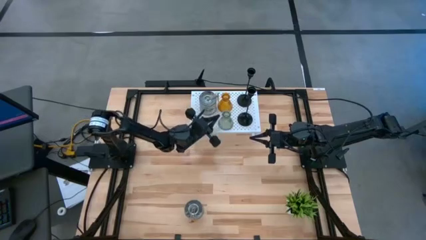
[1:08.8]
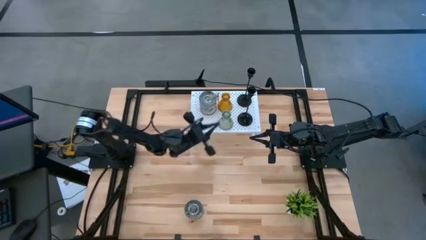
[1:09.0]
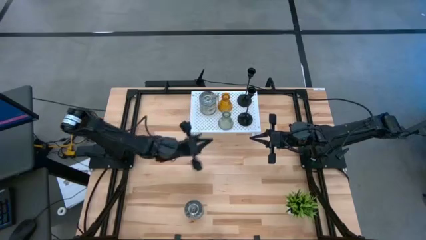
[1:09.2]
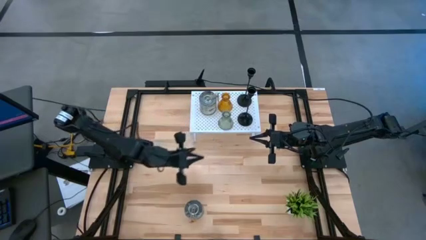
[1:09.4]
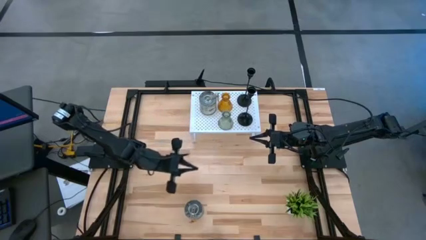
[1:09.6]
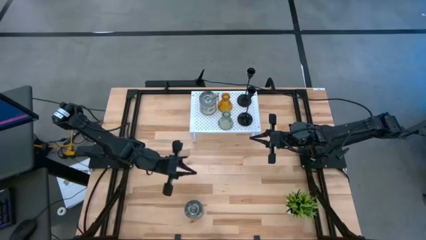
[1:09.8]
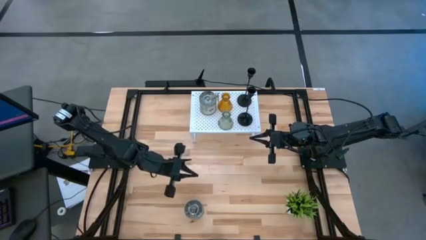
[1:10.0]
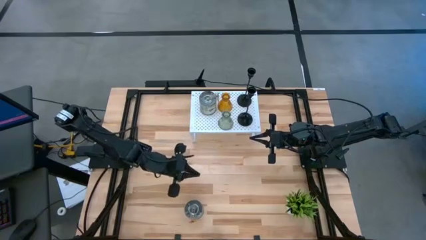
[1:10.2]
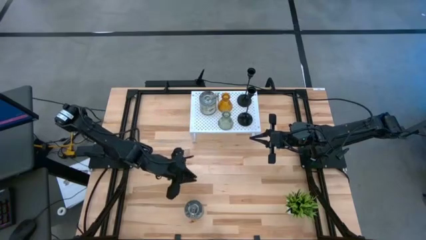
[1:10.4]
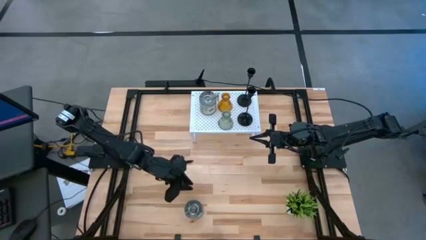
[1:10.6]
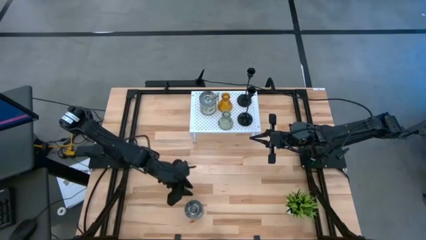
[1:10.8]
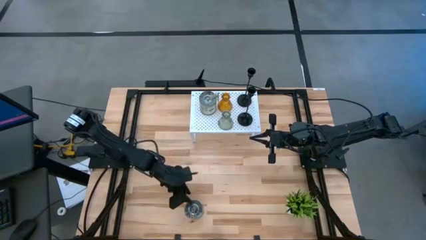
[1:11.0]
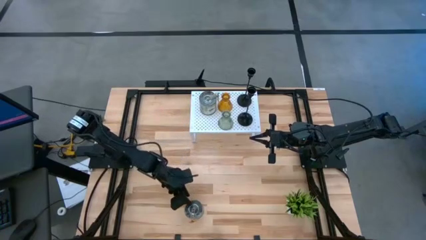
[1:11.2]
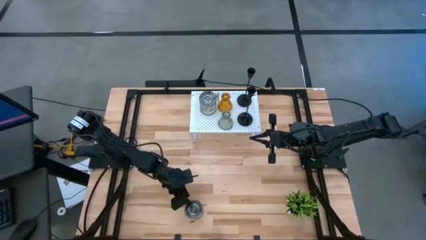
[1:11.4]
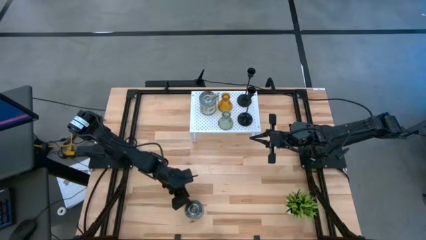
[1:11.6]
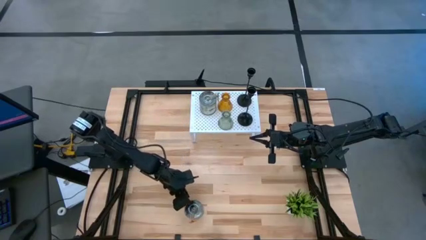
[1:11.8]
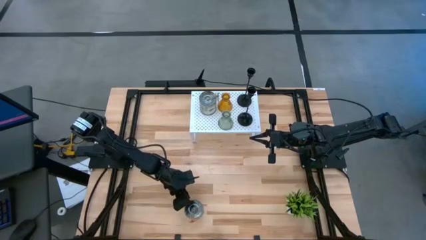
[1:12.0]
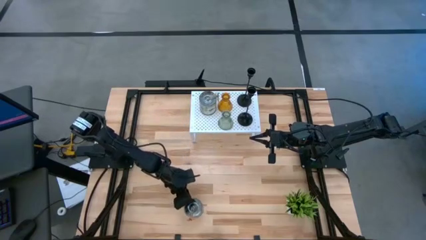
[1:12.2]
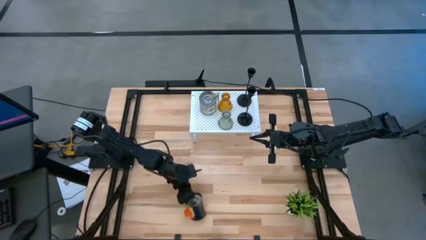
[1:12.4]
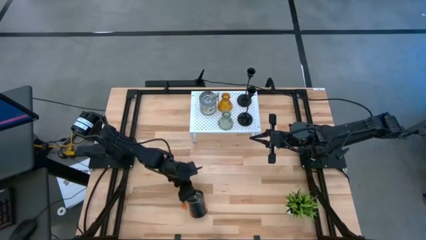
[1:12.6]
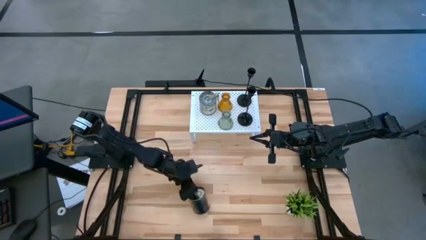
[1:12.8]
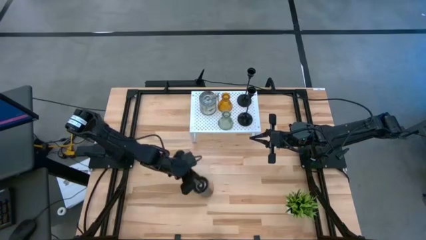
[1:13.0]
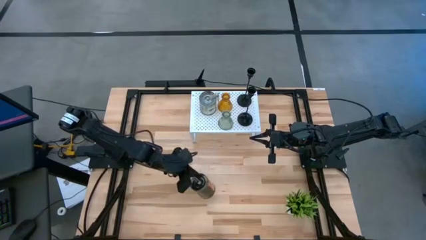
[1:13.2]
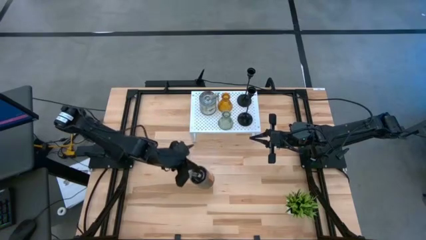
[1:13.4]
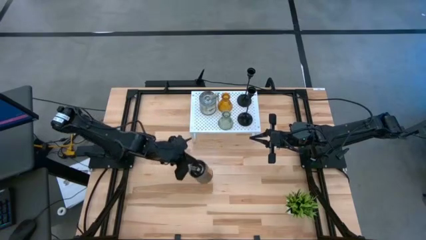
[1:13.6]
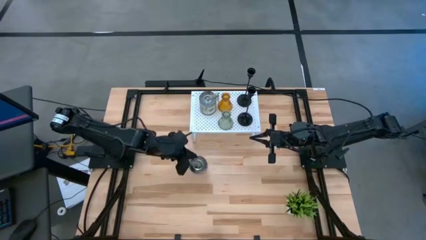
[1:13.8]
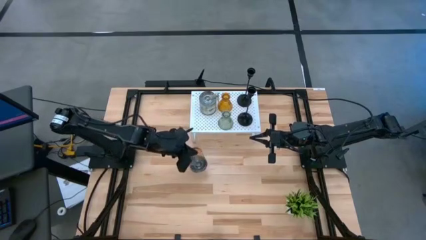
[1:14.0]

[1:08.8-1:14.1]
Task: Pick & Place candle stick holders
Put the orange scented candle on the shelf align with the other green scented candle

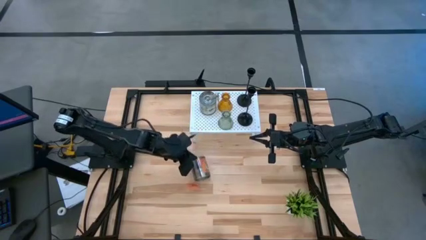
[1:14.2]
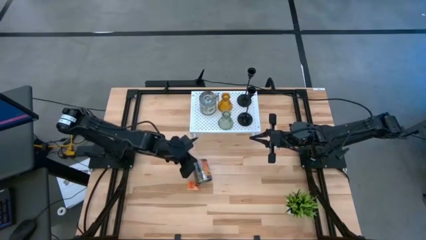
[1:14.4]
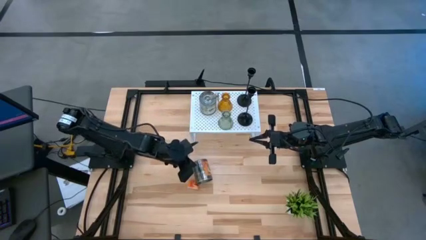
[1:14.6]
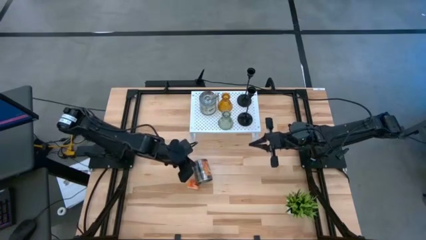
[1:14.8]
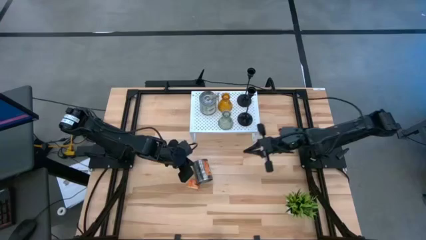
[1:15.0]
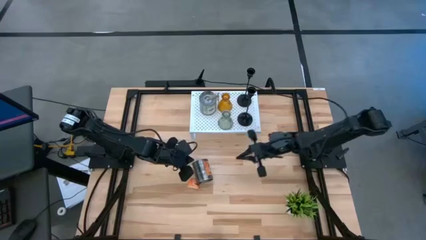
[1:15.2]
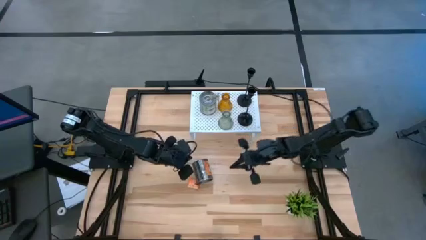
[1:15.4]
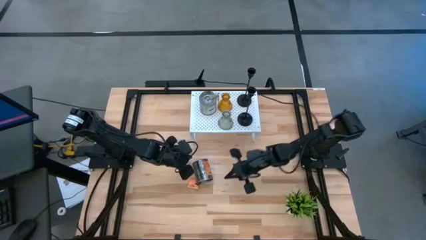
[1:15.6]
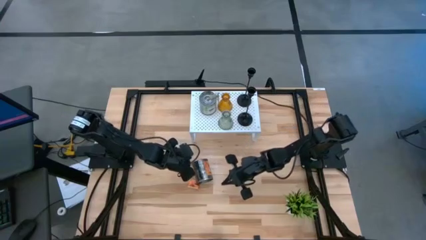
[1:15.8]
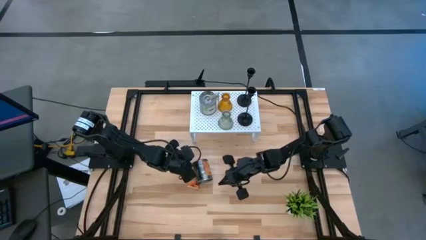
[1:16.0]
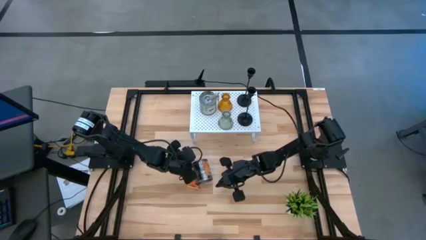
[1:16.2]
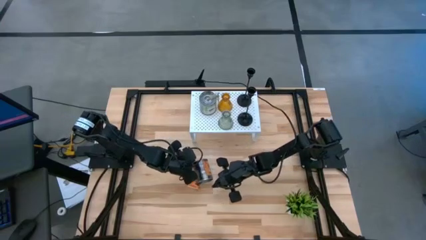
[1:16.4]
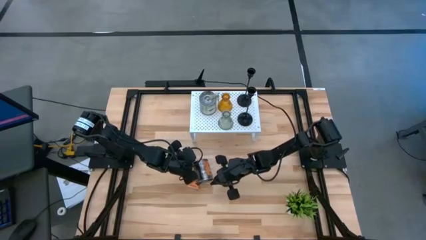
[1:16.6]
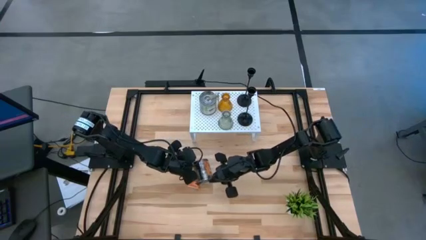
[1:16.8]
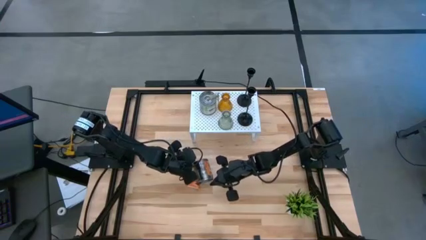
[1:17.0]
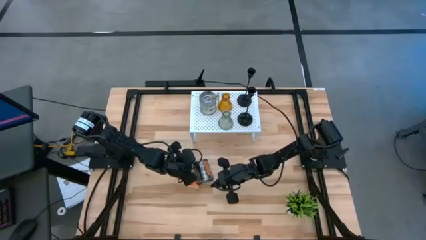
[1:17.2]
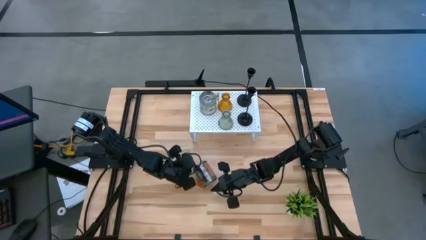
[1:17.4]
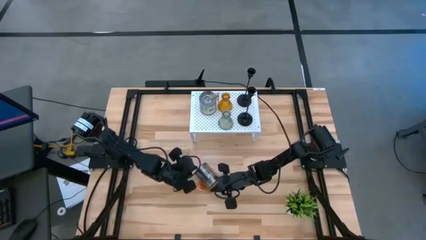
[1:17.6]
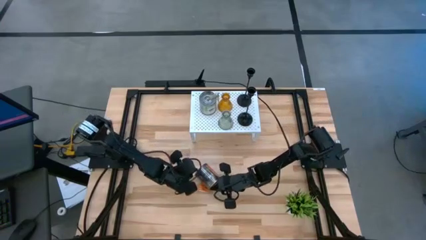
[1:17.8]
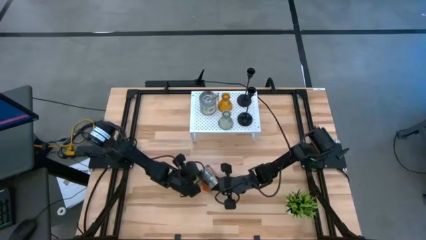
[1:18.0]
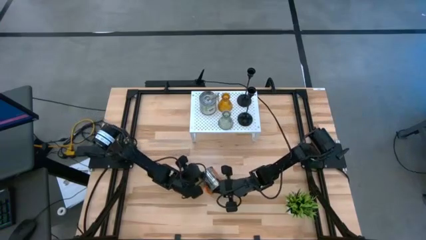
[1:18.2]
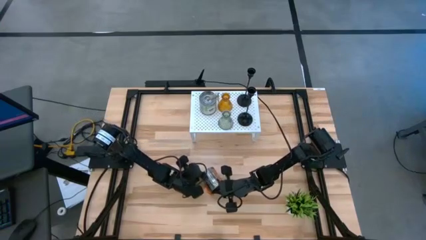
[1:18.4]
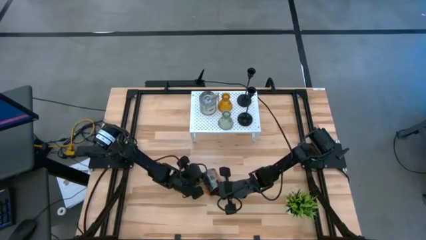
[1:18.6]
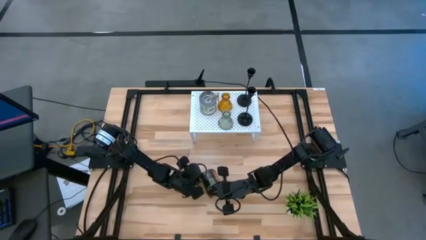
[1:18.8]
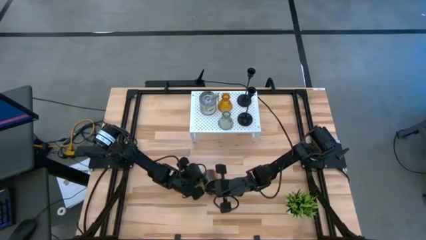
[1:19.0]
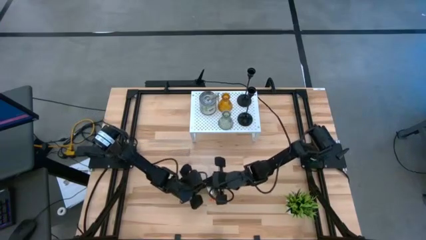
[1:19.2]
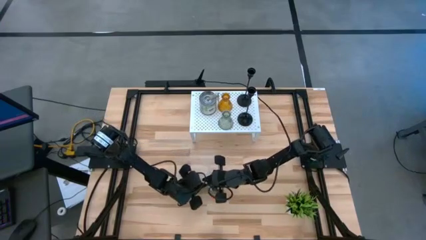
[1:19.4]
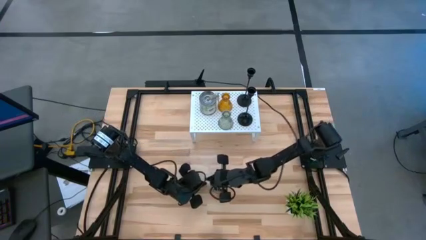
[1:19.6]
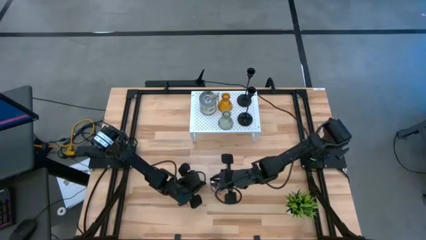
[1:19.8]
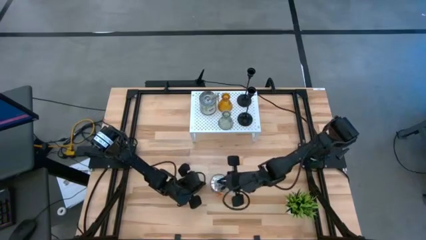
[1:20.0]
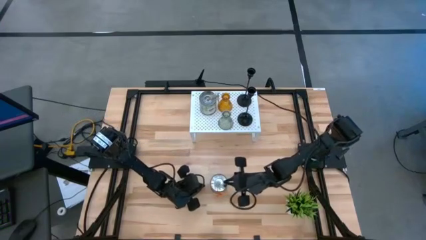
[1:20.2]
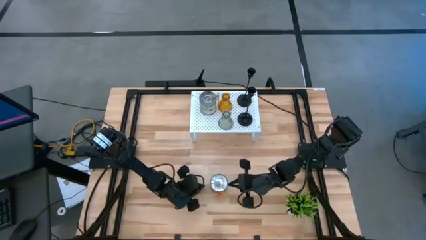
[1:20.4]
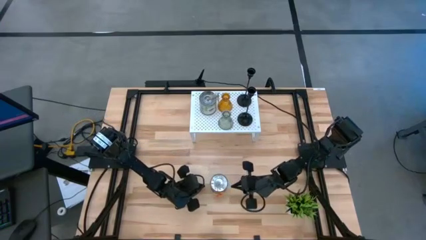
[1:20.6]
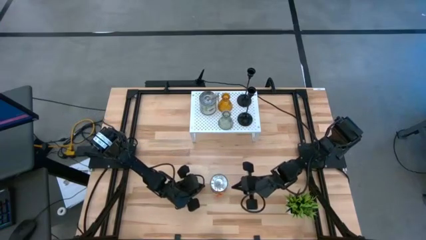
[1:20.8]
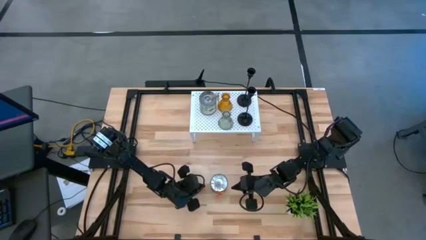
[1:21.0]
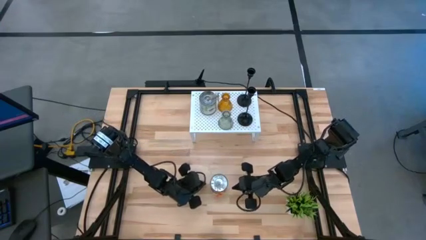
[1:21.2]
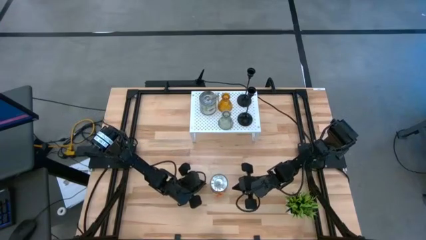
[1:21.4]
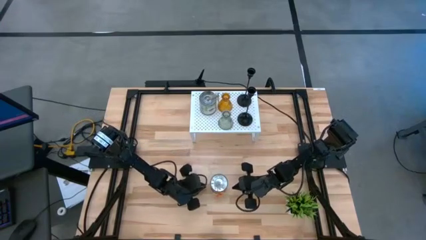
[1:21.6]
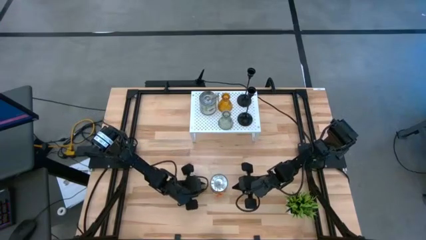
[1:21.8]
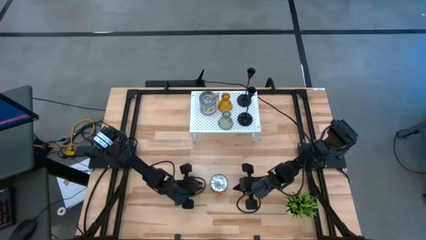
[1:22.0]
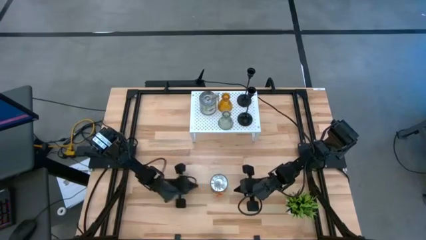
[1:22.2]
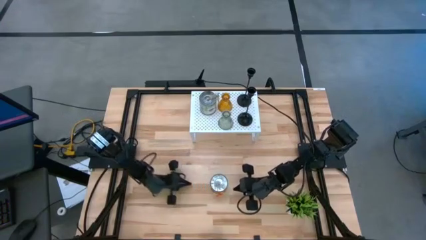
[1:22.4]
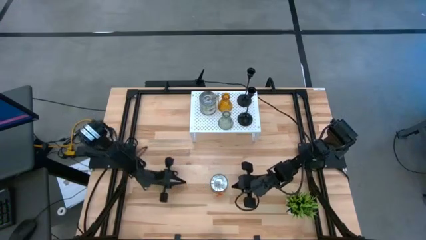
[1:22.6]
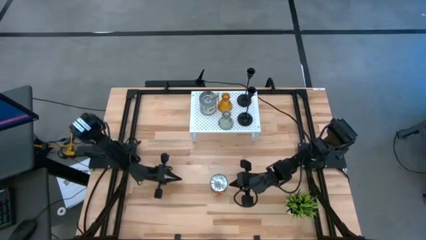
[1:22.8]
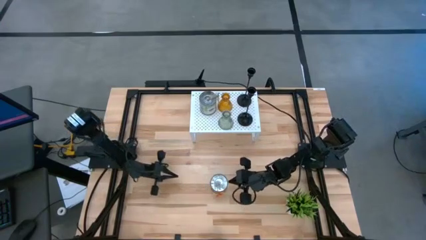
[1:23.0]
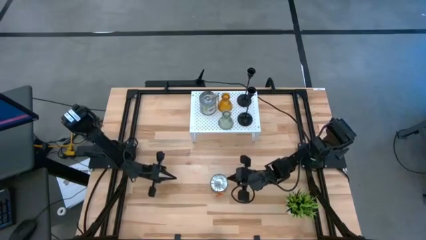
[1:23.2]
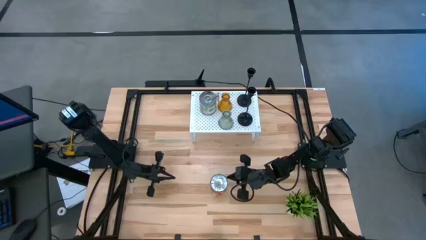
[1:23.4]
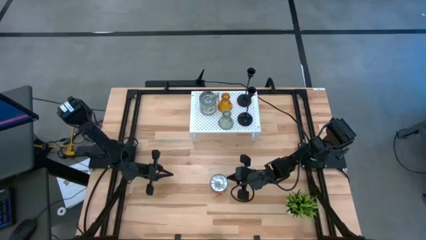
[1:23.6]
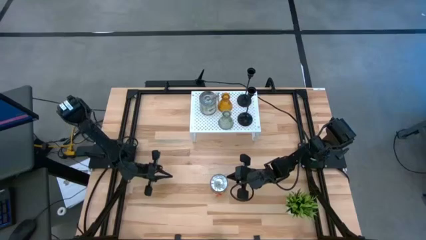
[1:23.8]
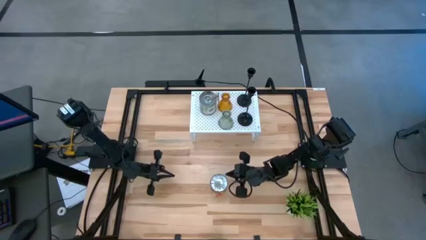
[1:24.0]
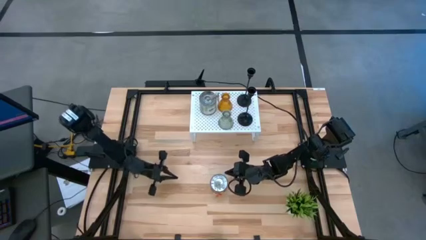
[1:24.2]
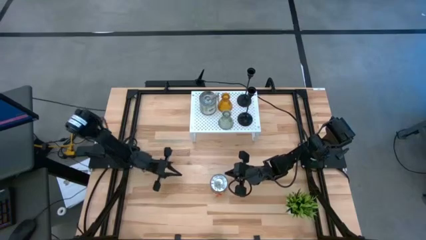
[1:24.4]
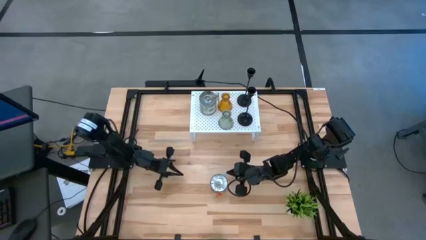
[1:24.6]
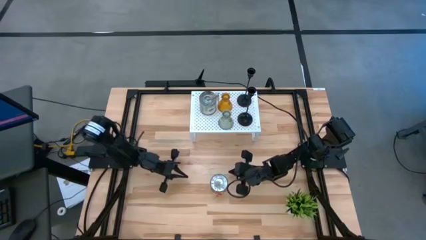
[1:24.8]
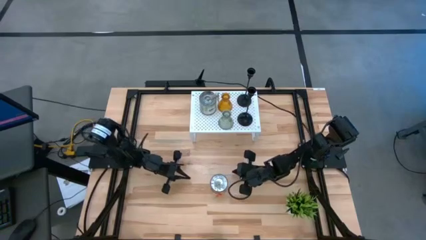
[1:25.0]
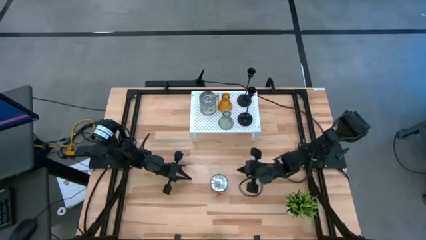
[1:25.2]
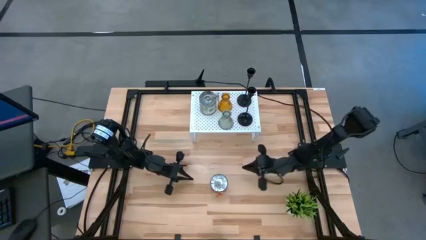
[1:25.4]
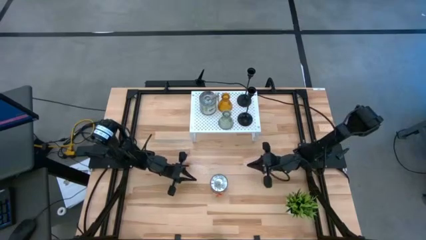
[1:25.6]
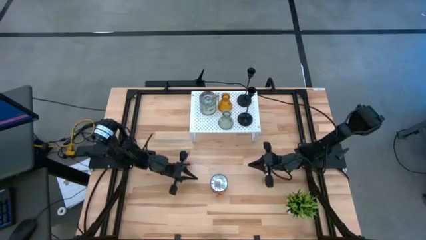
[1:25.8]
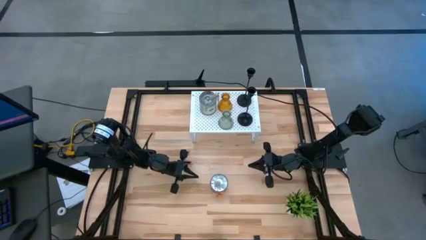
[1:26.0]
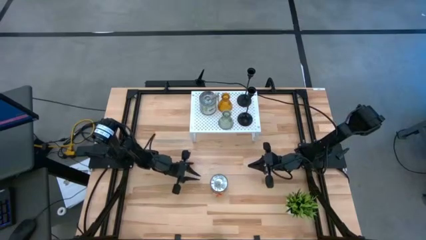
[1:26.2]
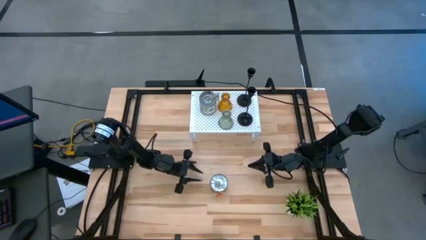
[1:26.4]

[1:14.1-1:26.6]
Put the orange scented candle on the shelf align with the other green scented candle
